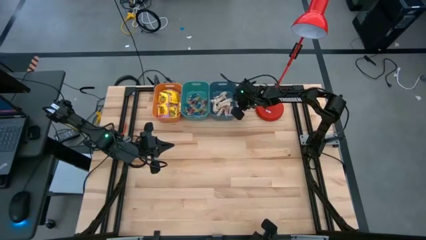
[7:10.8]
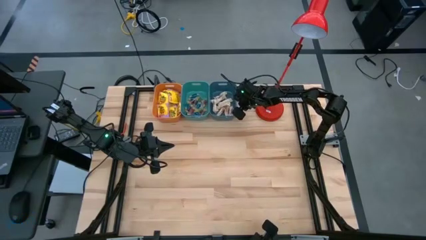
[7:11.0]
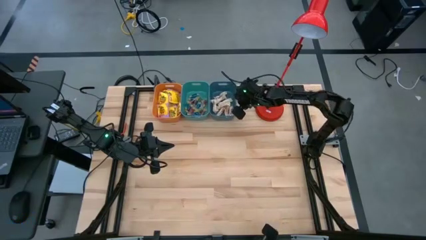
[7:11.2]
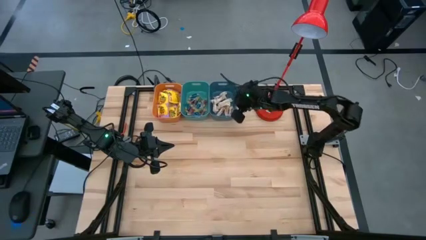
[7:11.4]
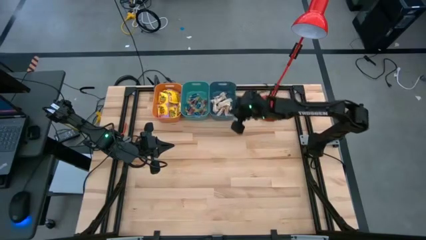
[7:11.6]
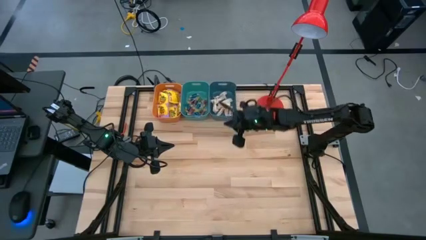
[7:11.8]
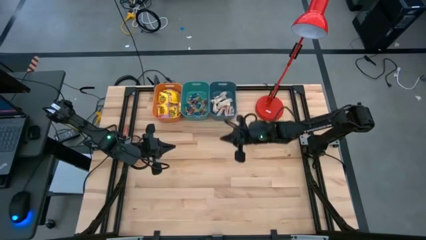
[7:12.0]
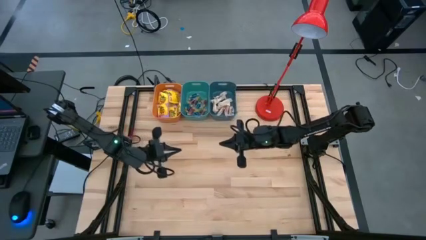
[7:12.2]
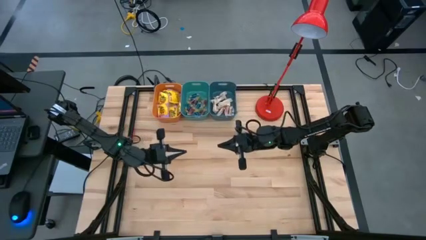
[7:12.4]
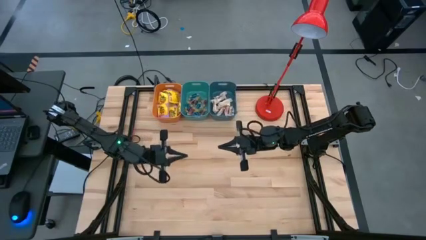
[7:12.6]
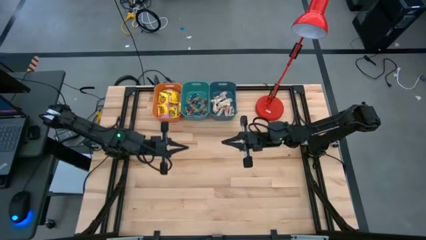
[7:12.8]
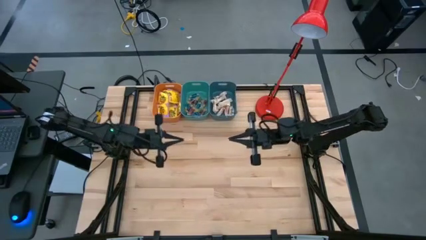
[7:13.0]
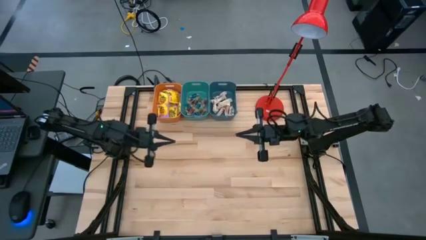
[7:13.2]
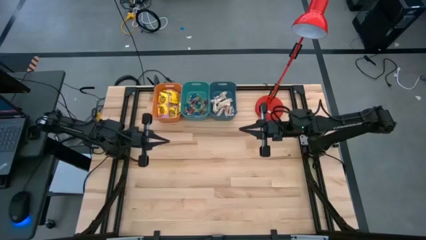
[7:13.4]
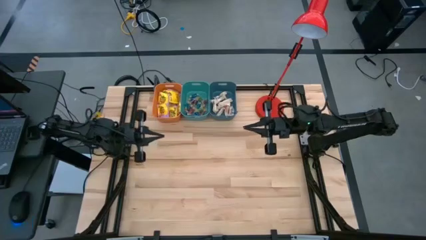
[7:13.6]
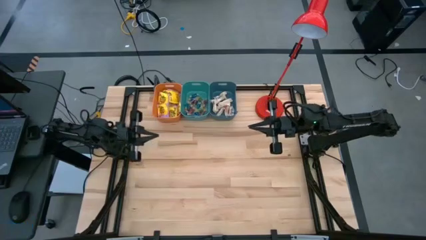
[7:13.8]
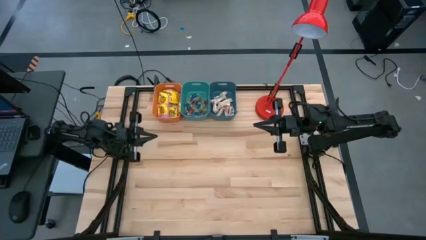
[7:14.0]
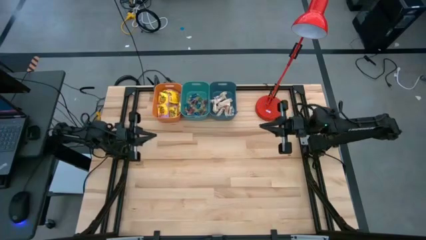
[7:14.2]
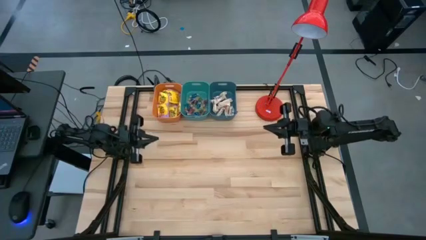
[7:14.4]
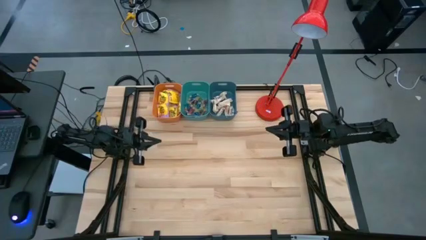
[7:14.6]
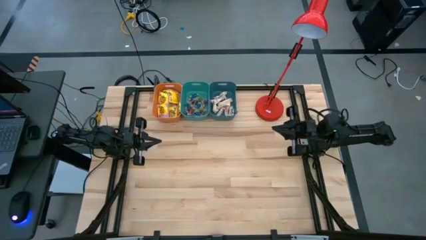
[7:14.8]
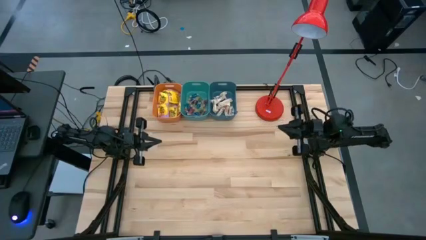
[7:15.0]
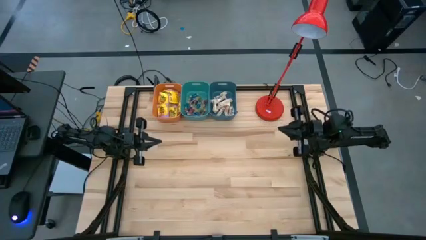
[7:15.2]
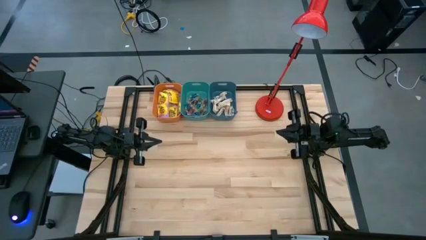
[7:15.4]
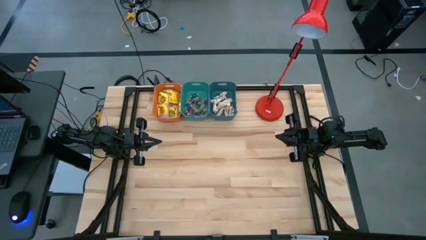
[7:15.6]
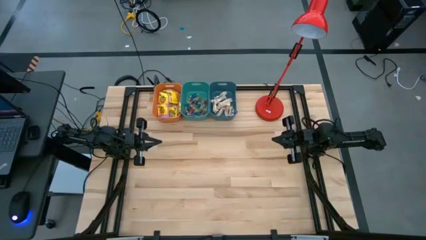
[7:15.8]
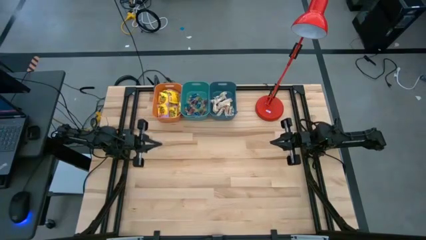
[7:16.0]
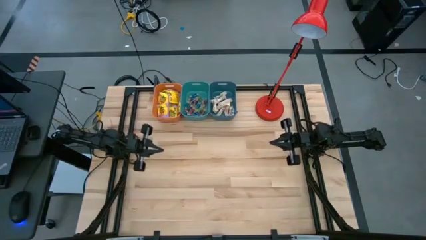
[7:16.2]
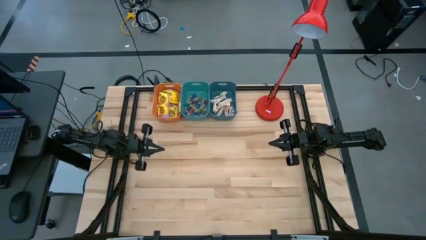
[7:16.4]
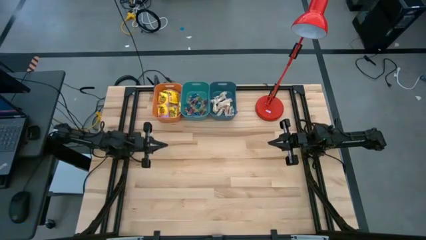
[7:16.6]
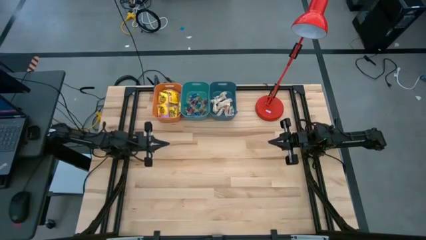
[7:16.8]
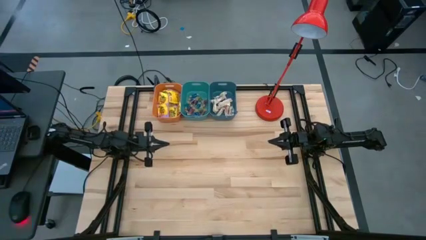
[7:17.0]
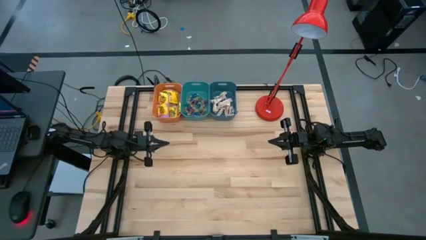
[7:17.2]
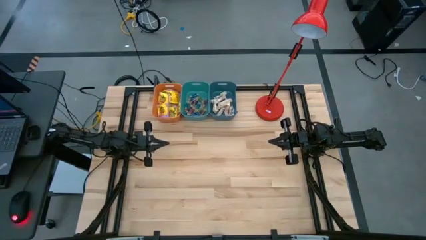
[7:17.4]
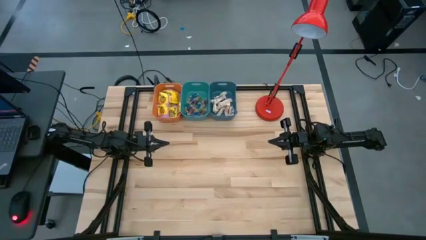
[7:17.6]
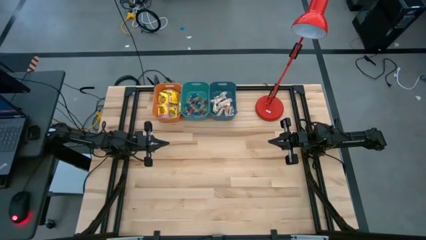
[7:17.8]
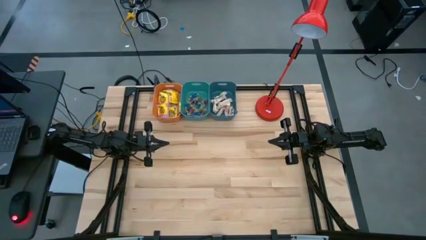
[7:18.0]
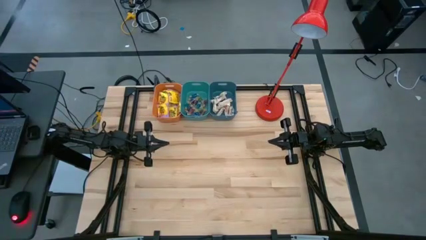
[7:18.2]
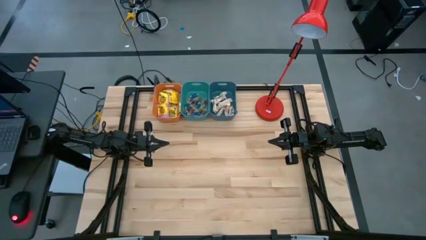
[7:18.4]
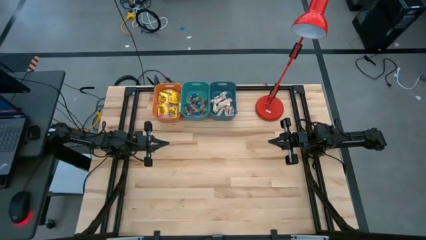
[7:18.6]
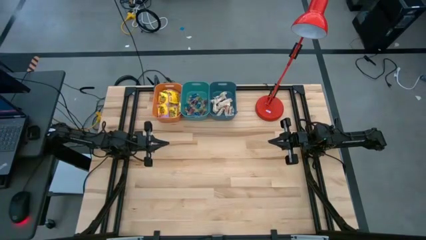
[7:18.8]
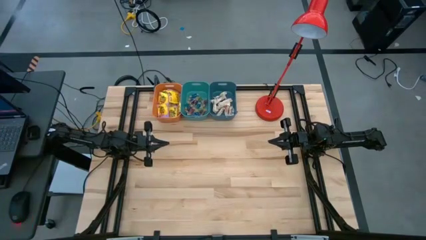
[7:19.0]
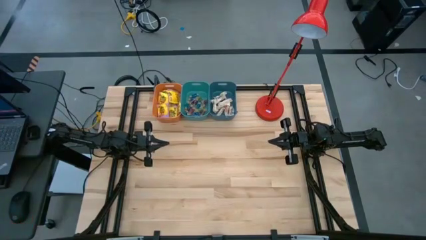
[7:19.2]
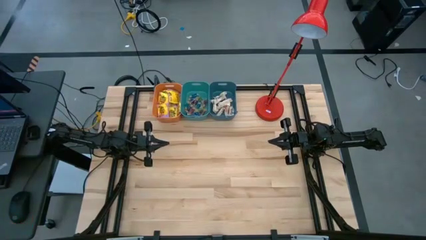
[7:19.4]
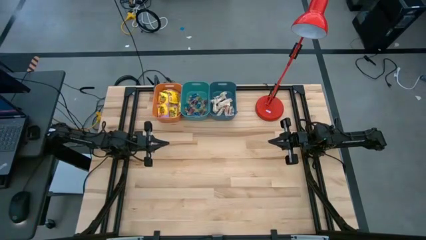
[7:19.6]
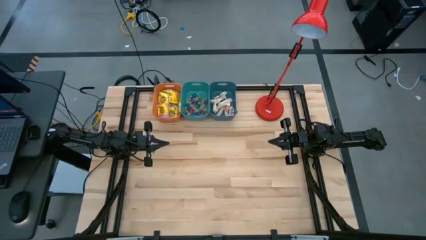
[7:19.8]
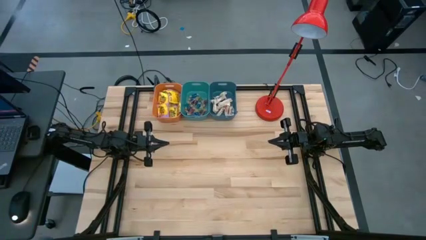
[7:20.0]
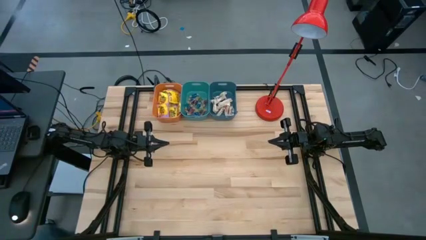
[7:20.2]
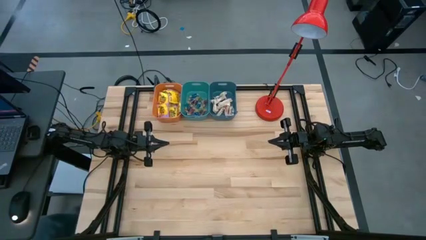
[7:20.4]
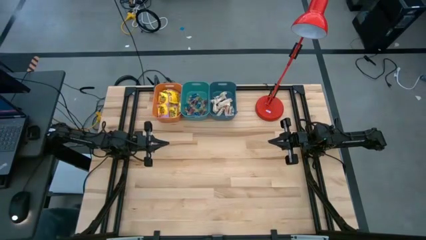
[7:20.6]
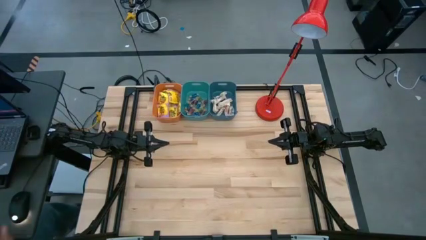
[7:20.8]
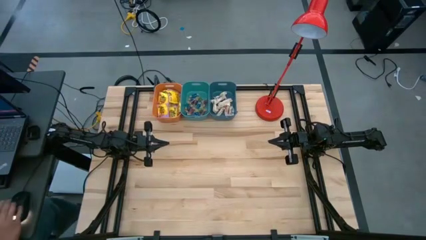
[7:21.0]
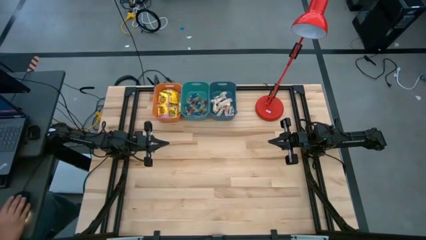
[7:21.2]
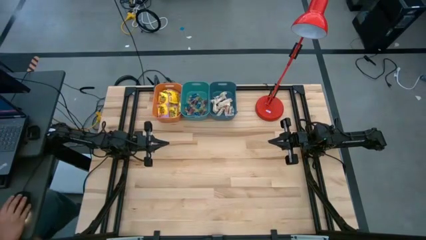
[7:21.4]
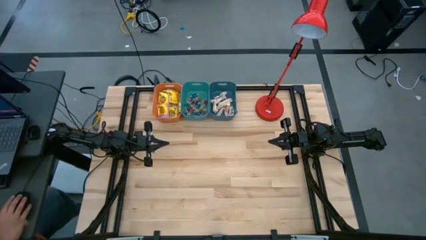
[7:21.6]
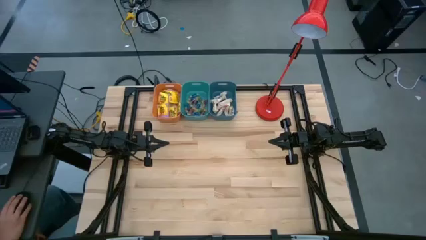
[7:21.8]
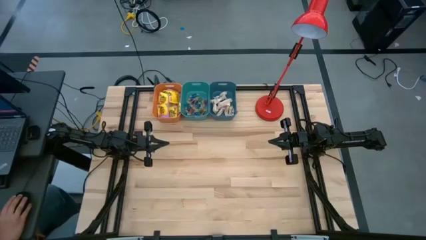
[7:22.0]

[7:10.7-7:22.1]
Task: Sort candy
Return to Home Position
